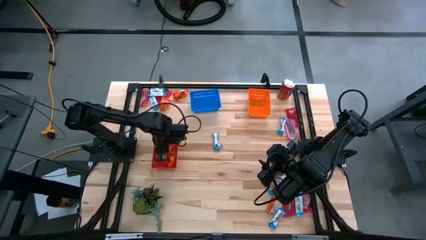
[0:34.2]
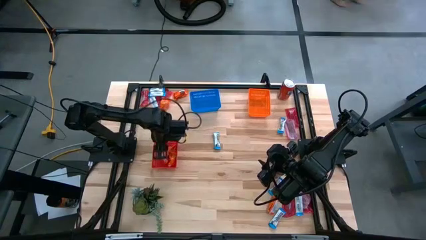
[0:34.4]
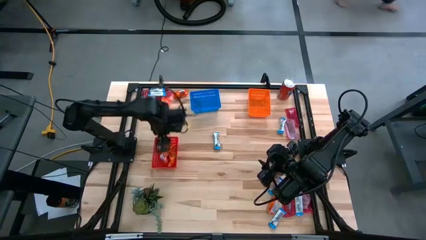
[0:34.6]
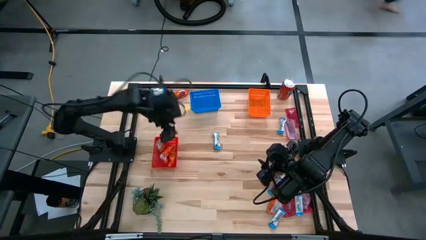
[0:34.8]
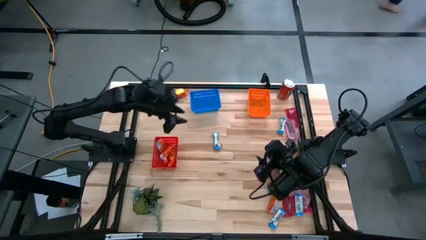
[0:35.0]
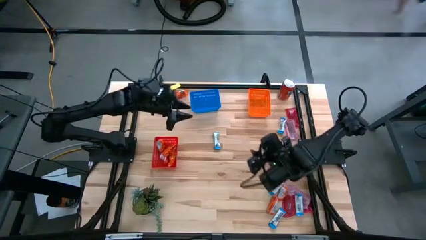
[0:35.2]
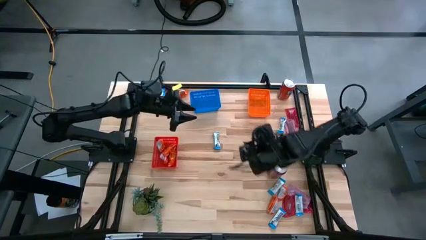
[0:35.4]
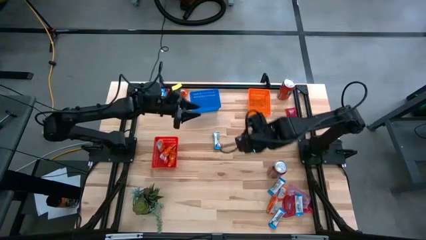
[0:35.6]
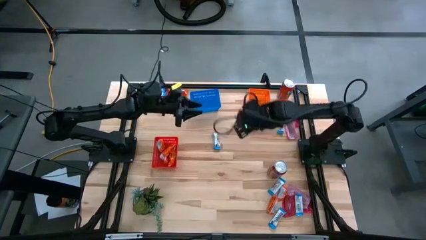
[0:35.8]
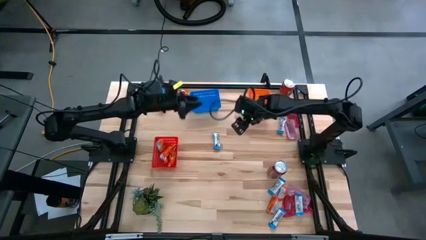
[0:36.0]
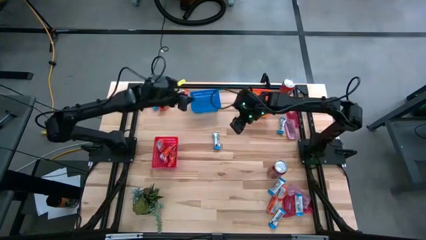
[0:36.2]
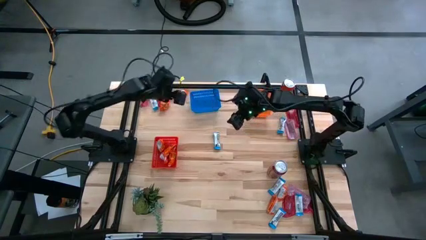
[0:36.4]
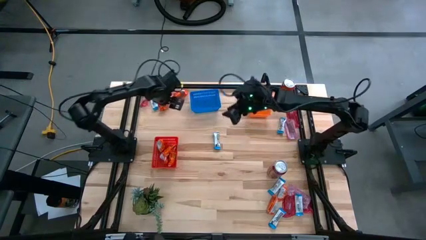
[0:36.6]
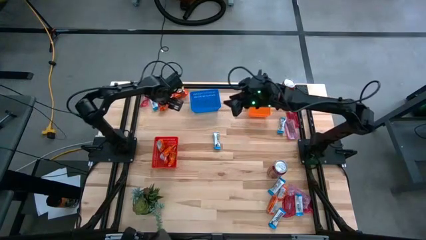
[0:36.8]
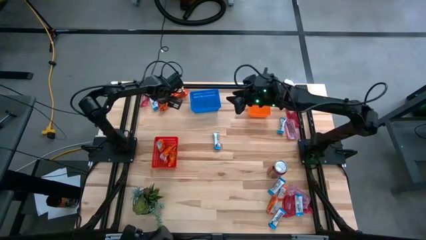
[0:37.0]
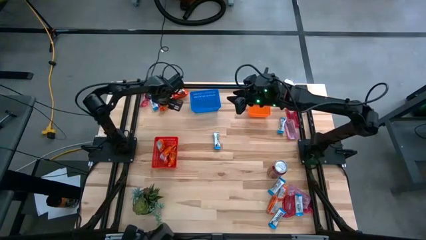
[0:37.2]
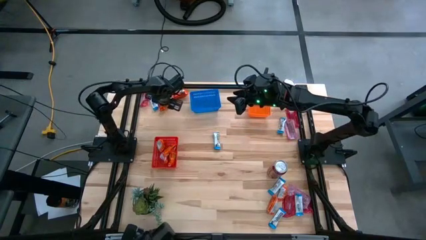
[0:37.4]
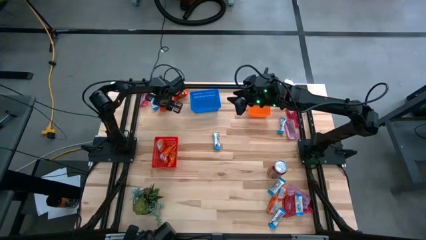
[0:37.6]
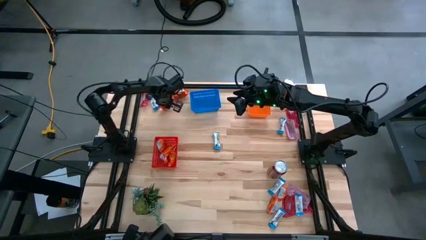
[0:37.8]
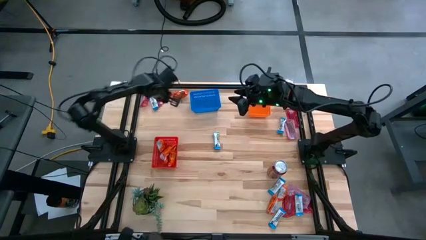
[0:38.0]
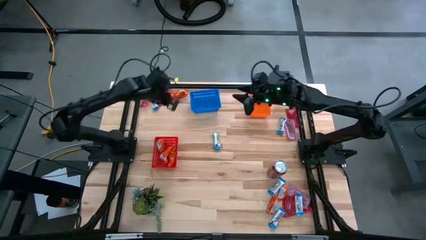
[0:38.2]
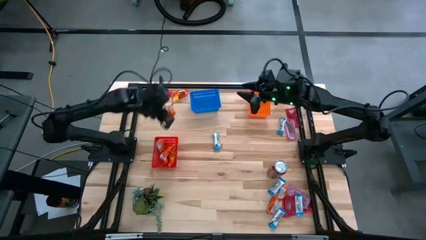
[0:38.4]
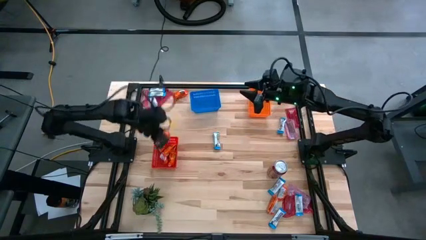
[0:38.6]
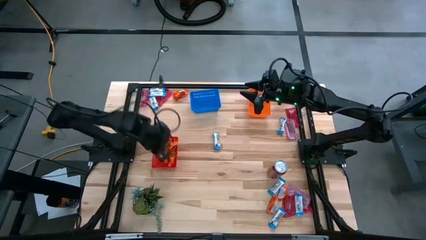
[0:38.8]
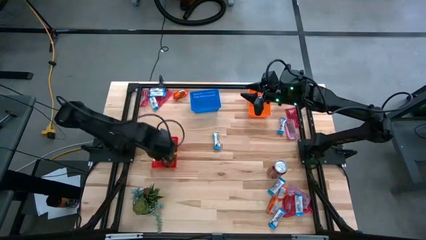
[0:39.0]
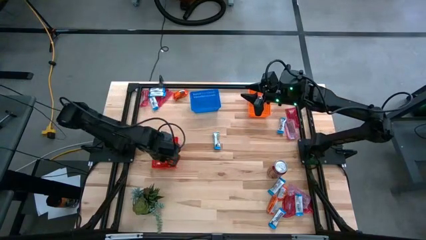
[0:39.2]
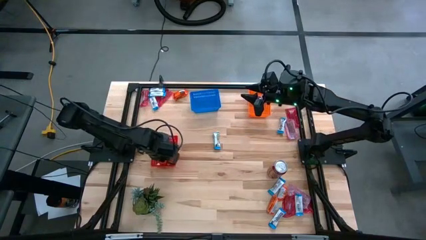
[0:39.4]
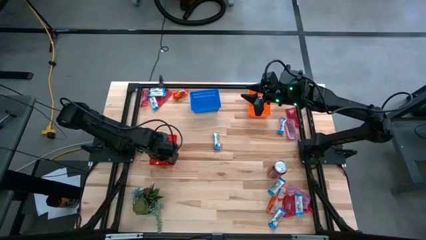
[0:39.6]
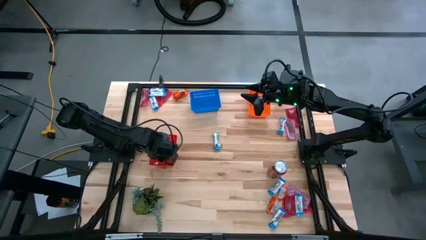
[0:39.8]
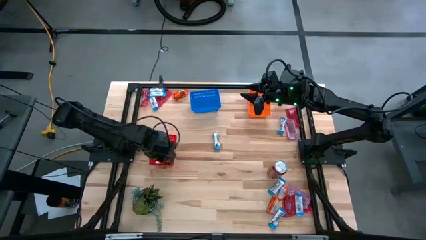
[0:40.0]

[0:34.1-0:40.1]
Task: Sort candy
Put the orange candy pack into the red basket

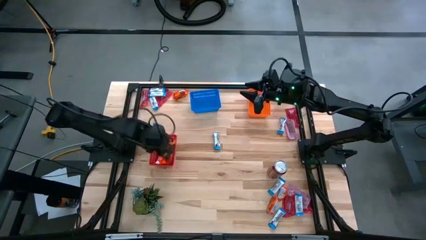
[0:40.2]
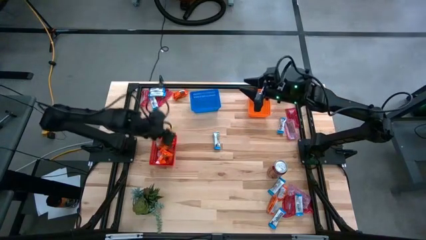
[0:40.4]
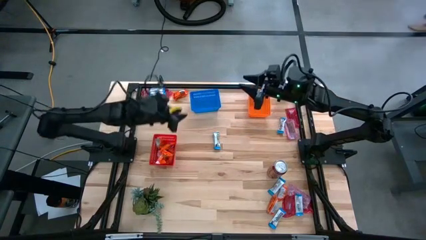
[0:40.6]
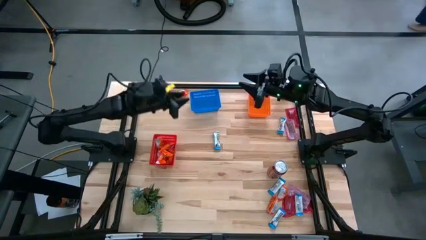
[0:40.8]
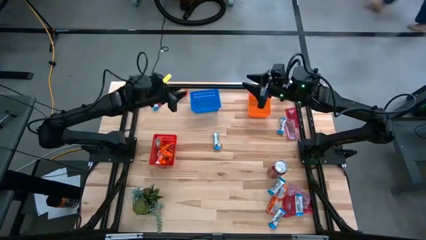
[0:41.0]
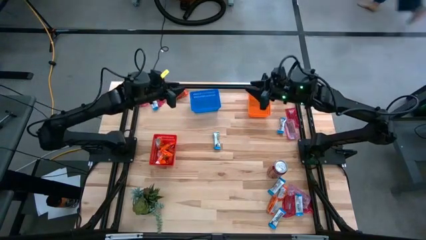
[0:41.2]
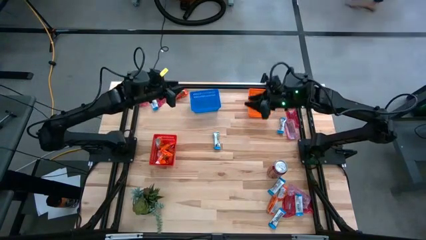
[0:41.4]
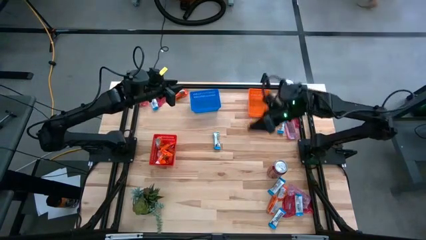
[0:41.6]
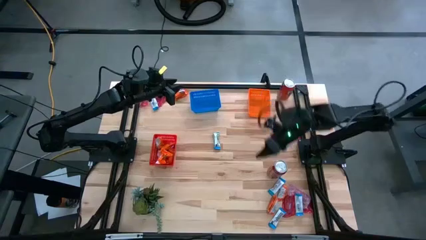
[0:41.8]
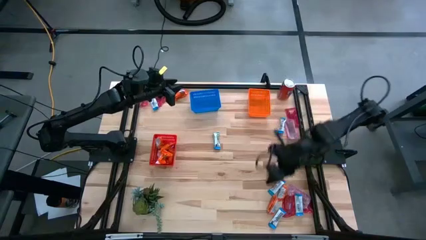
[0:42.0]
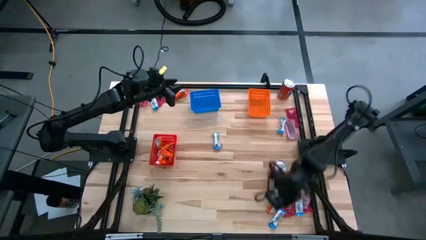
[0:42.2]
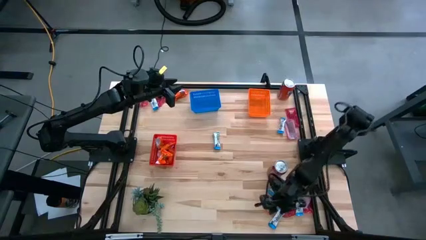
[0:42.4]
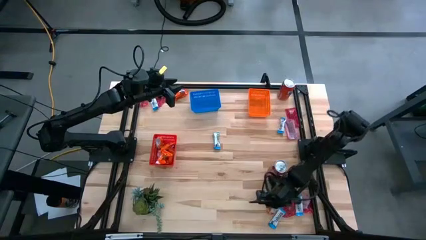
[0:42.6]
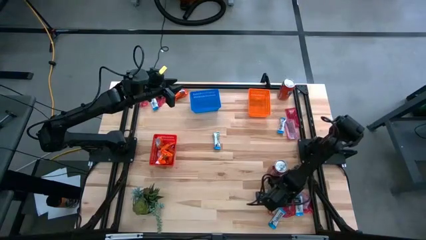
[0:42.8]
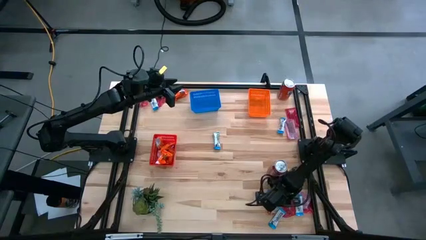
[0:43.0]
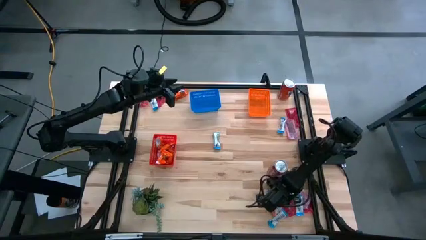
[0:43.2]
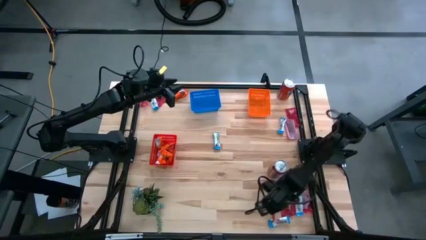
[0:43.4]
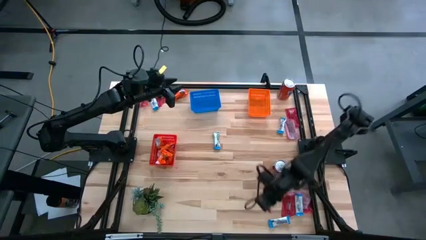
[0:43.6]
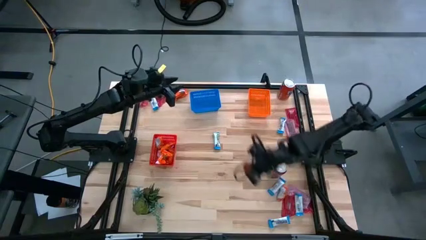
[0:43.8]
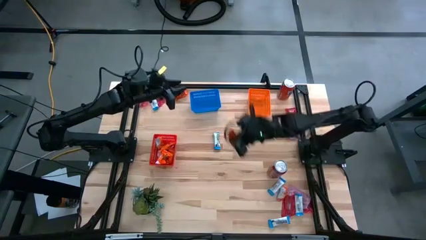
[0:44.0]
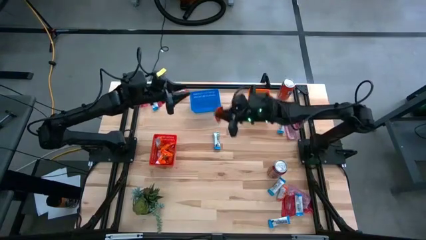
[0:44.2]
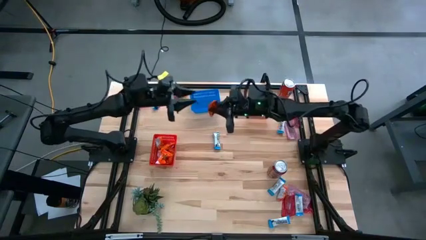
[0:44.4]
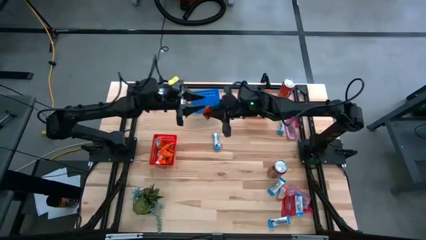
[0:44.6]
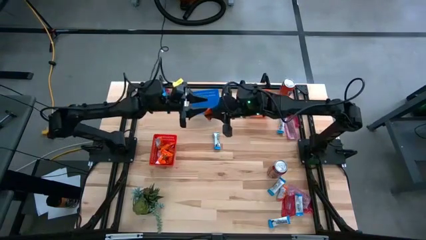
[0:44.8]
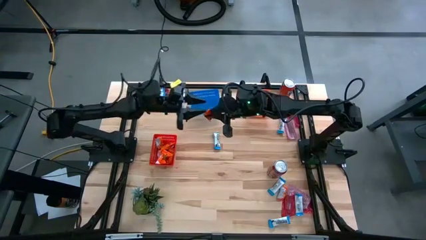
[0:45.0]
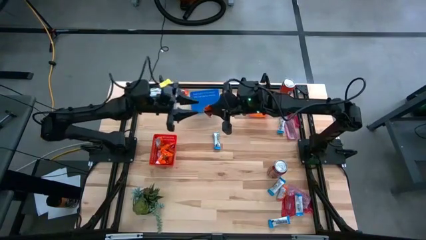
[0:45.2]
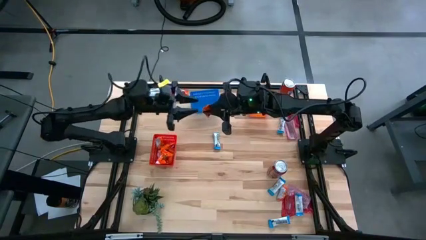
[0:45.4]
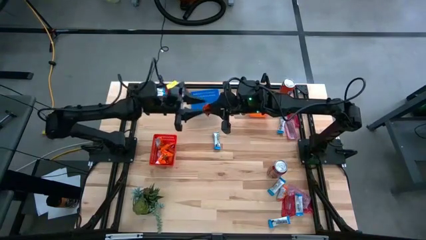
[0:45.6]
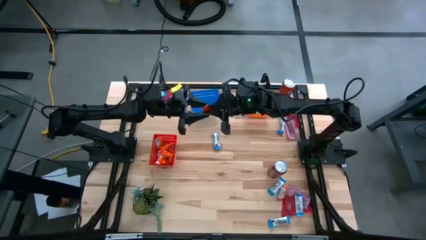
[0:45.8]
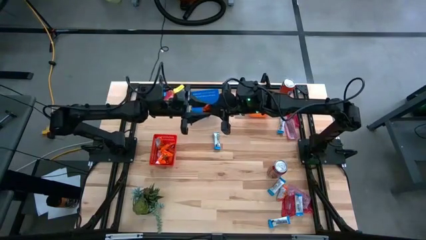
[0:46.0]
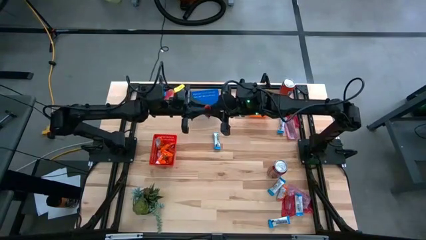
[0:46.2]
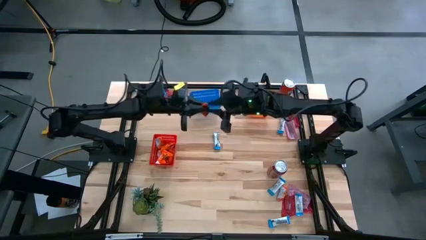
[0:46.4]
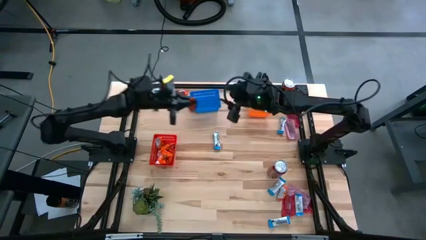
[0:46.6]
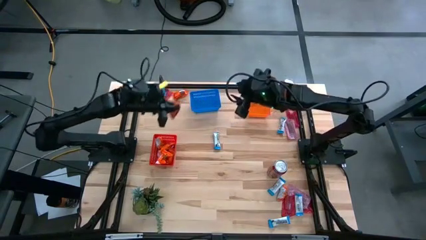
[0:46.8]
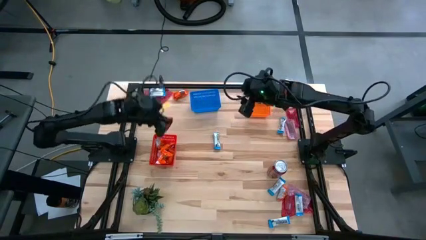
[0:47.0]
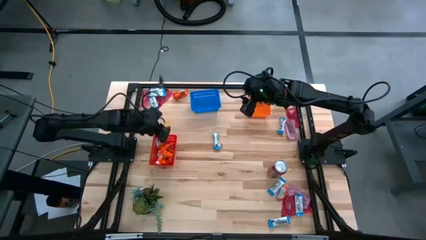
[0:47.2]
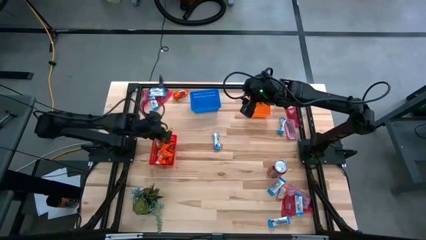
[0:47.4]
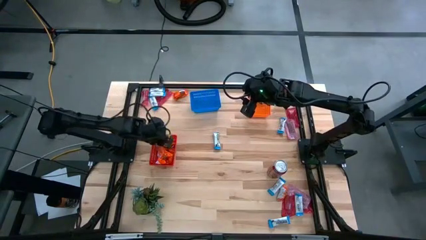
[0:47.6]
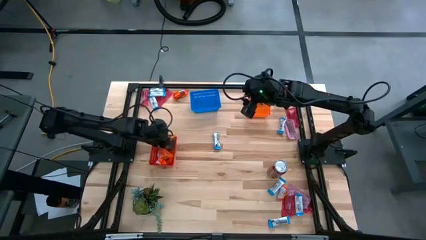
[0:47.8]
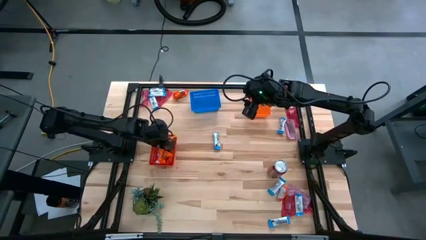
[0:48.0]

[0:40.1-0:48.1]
Put the orange candy pack into the red basket

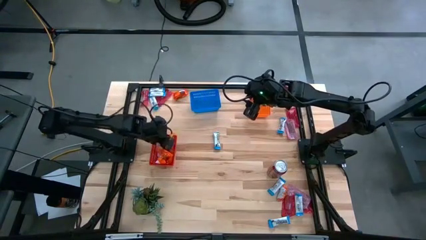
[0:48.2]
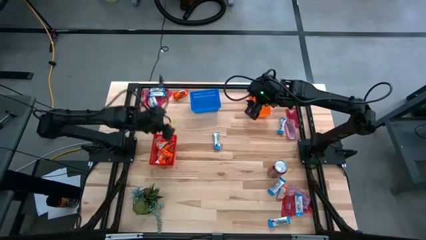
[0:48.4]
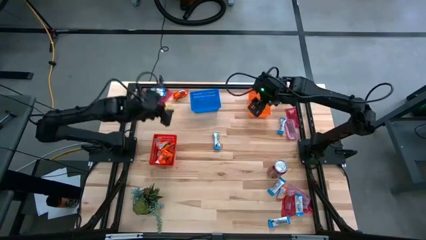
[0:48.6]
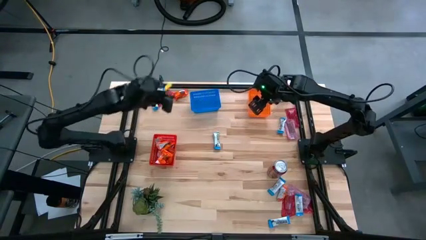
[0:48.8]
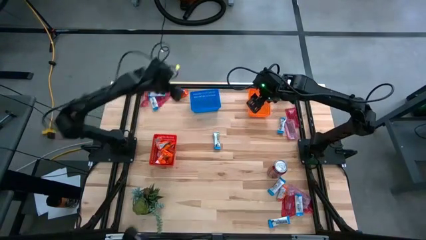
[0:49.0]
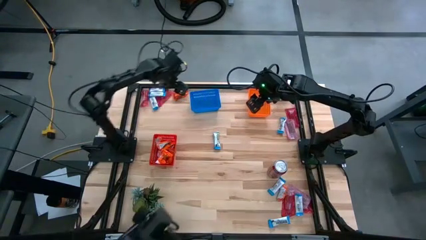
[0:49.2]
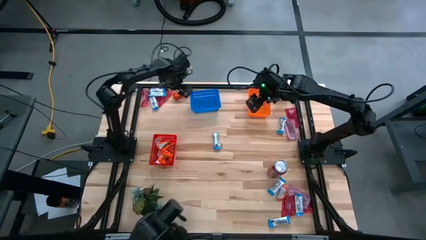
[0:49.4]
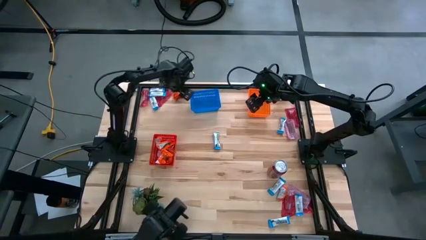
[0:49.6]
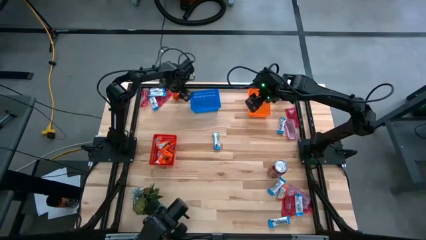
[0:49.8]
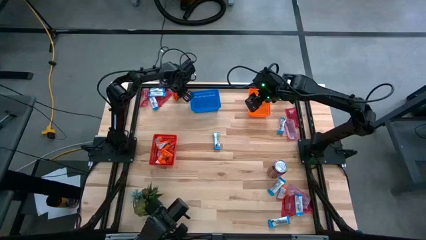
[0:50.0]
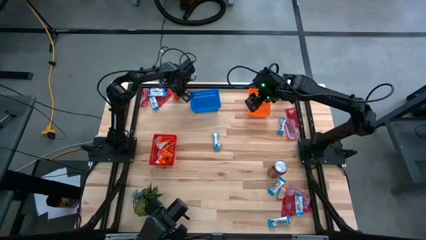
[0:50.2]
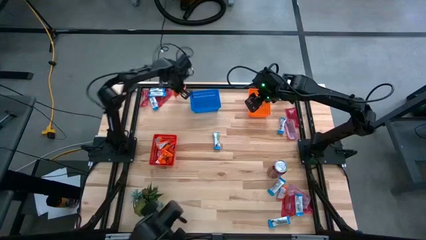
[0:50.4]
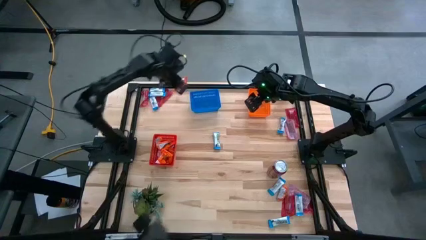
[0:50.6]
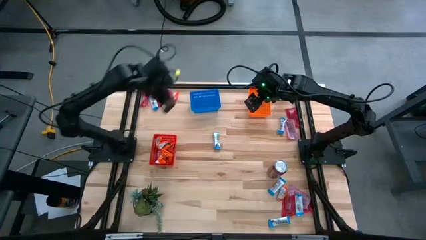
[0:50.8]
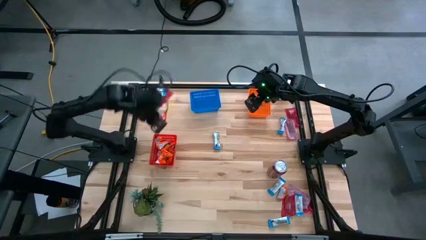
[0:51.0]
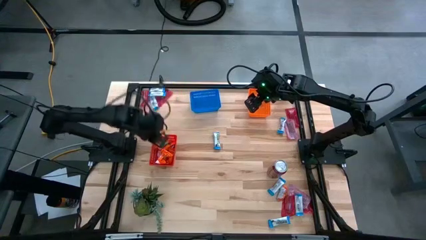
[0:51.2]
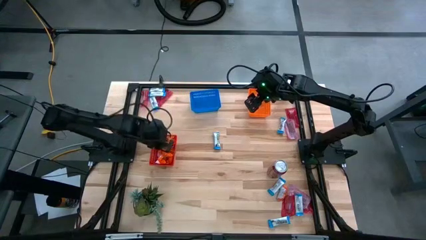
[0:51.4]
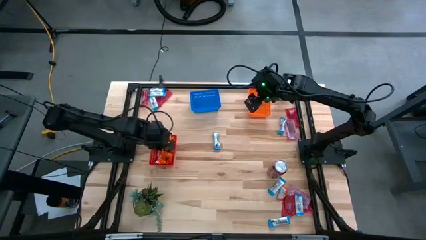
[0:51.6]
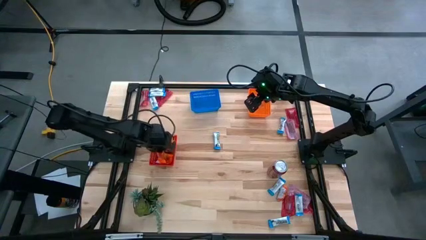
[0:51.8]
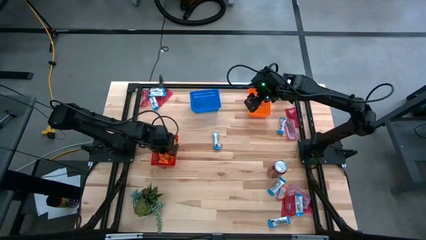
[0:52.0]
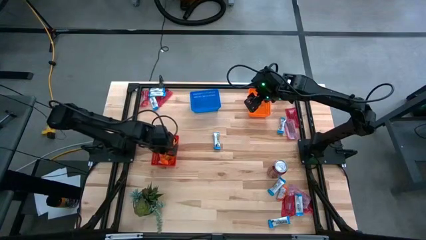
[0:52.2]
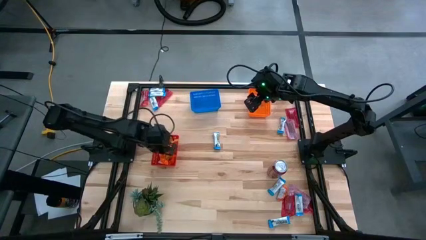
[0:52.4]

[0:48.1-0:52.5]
Put the orange candy pack into the red basket
